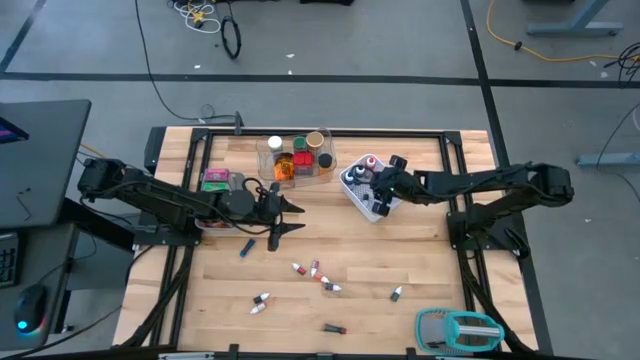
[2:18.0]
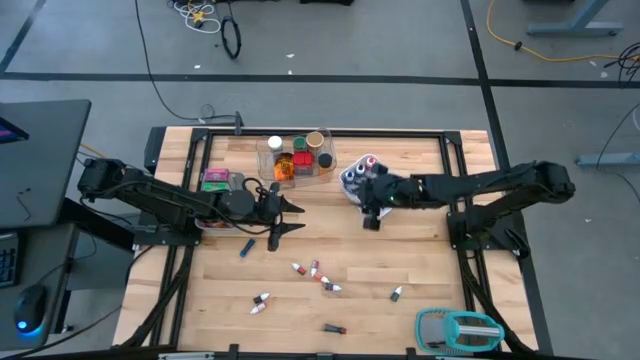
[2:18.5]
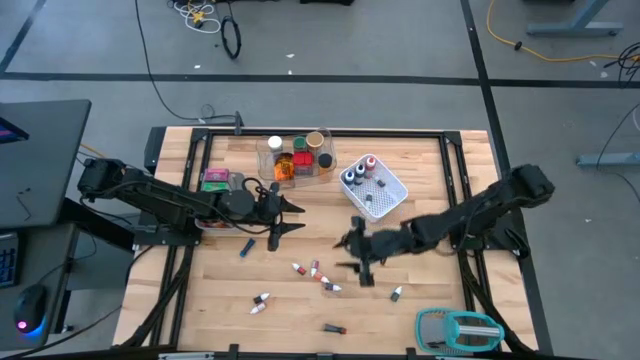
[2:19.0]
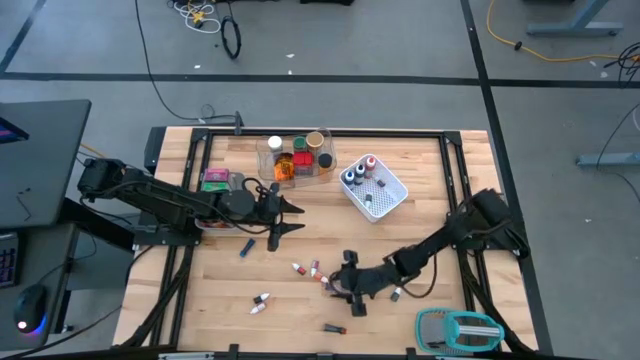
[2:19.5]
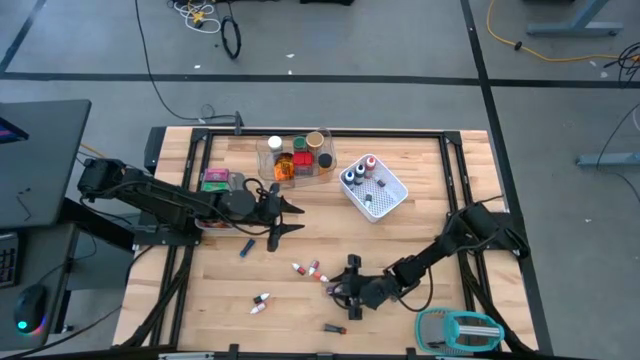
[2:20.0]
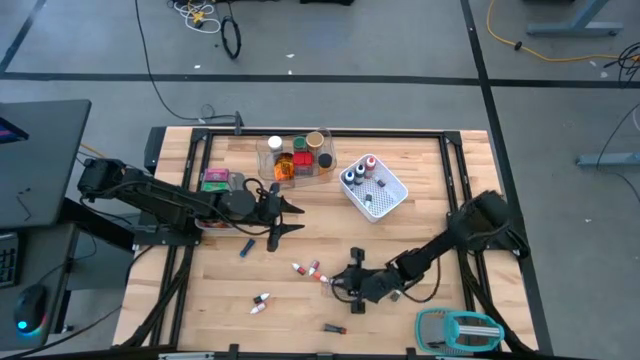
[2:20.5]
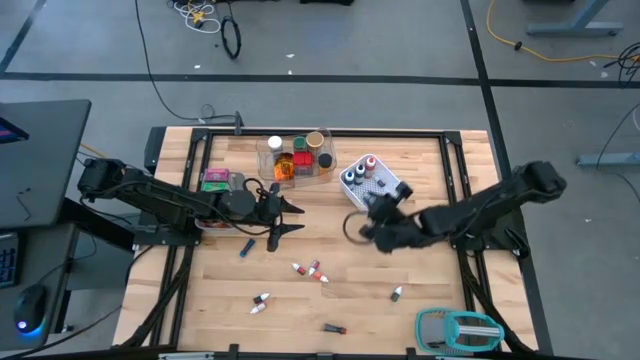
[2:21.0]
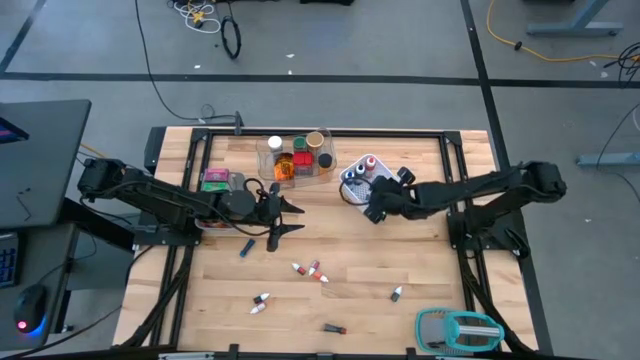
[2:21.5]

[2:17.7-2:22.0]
Task: Pick & Place Kitchen Items
Put the purple food coloring bottle into the white bin

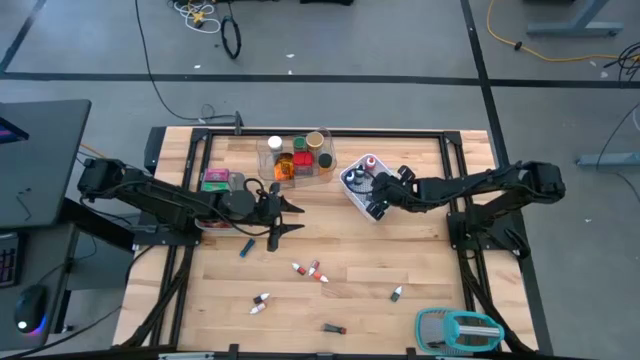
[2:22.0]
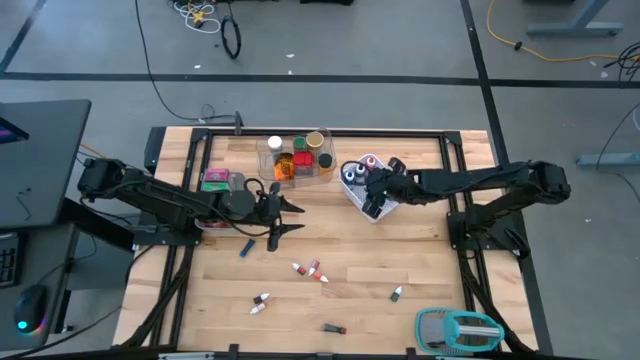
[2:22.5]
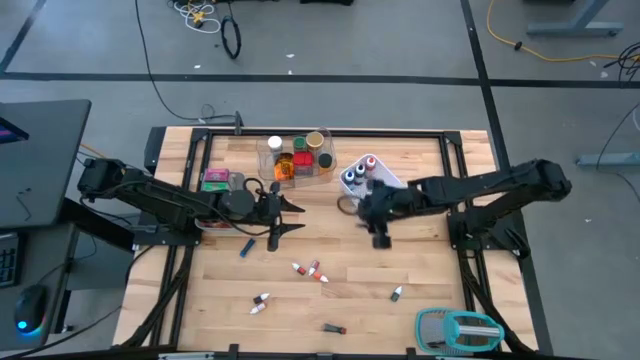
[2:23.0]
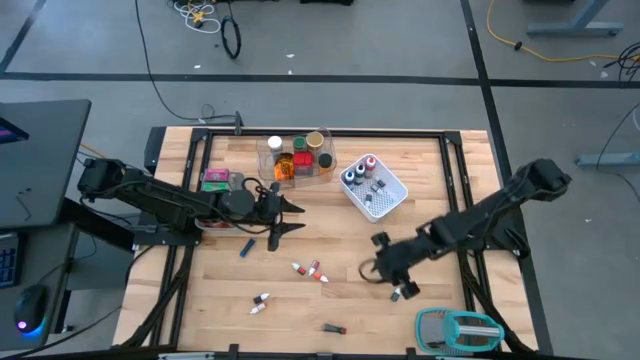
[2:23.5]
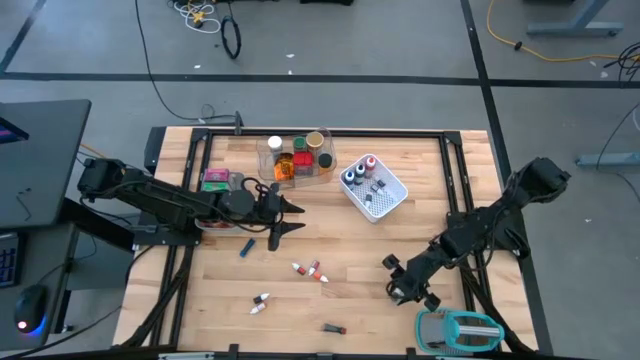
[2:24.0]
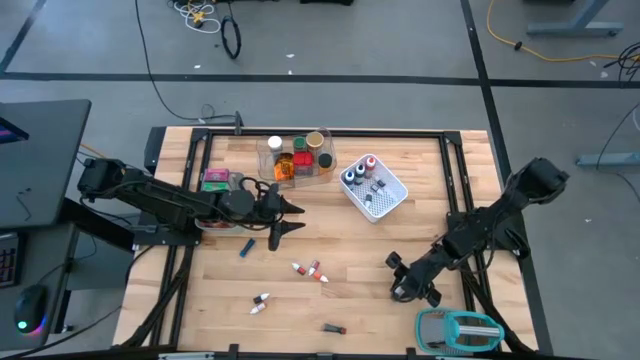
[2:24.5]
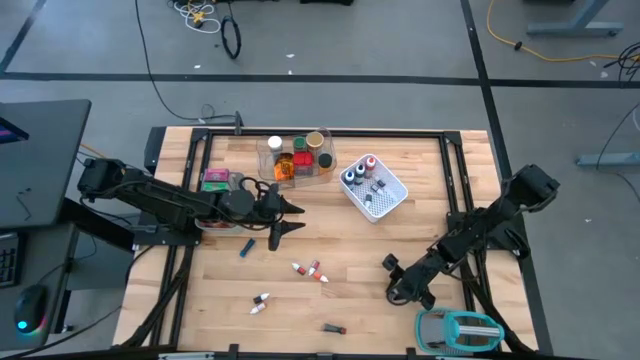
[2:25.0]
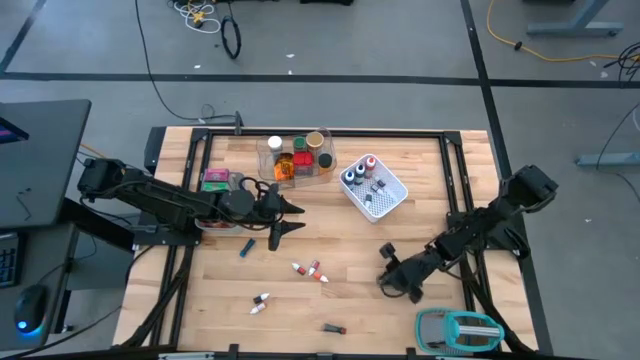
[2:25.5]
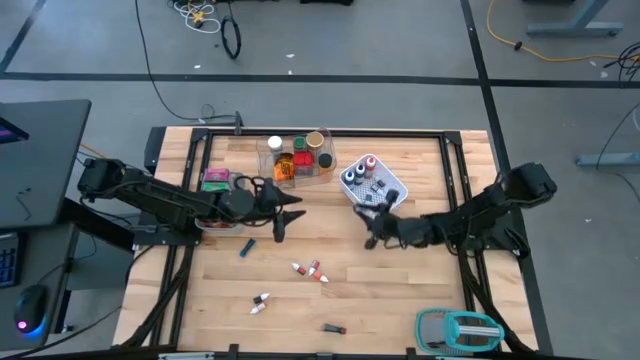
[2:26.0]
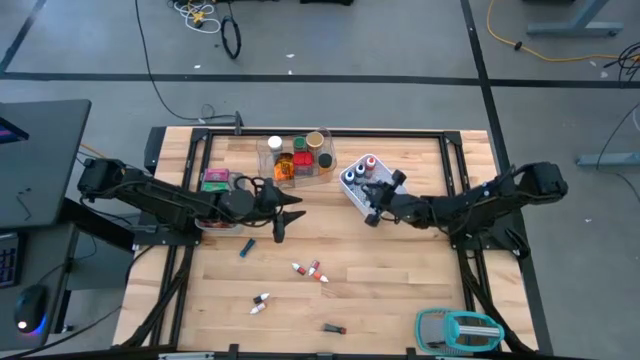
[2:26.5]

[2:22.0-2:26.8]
Put the right black food coloring bottle into the white bin

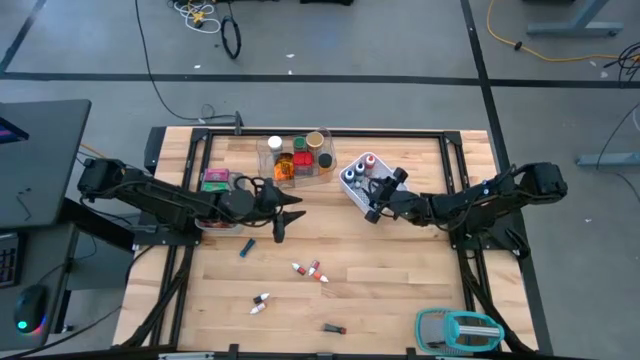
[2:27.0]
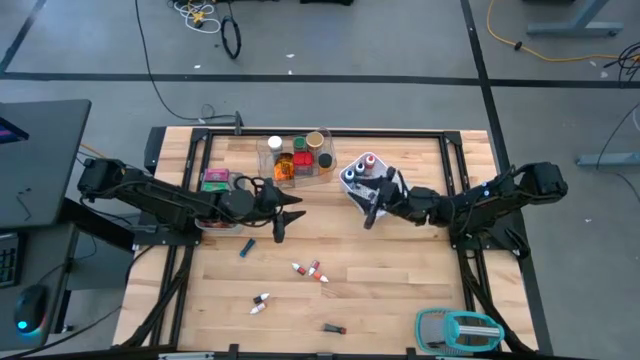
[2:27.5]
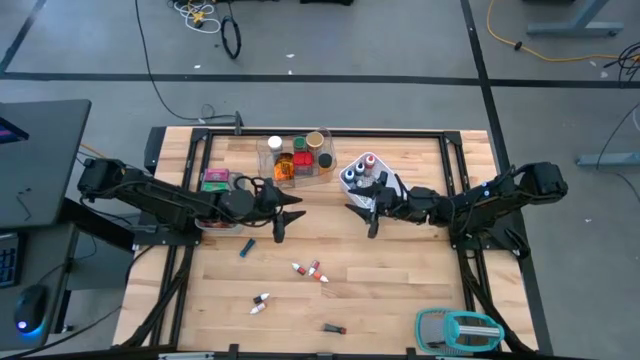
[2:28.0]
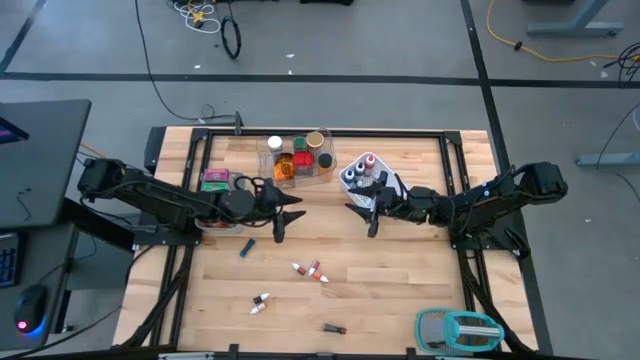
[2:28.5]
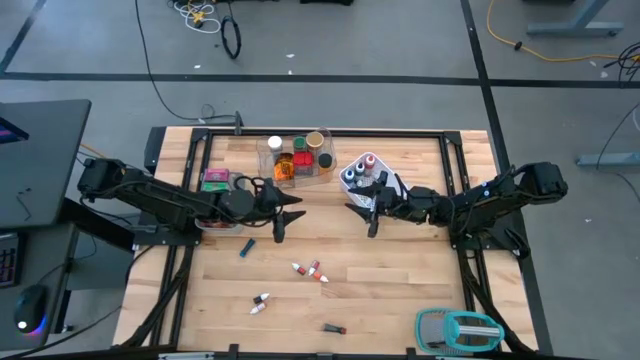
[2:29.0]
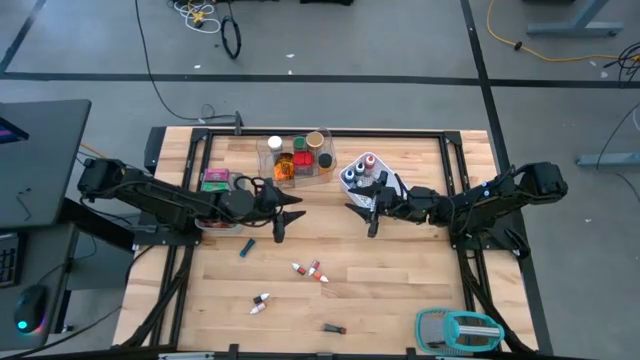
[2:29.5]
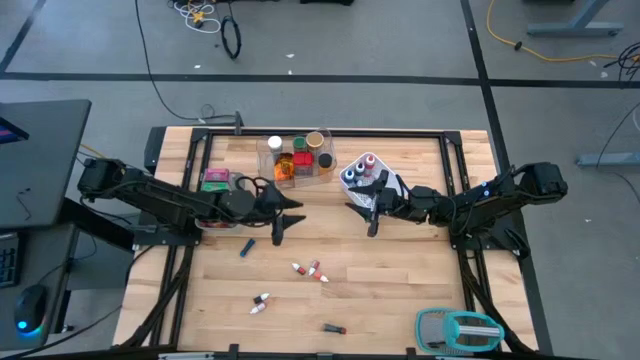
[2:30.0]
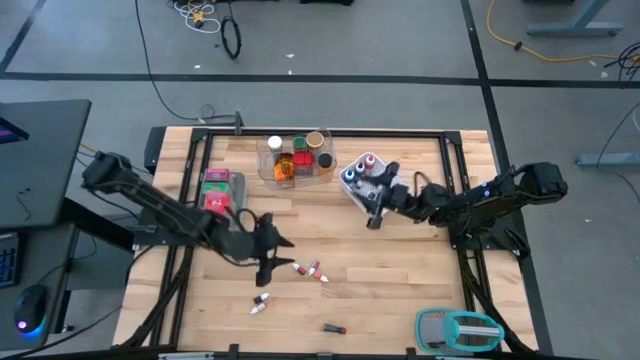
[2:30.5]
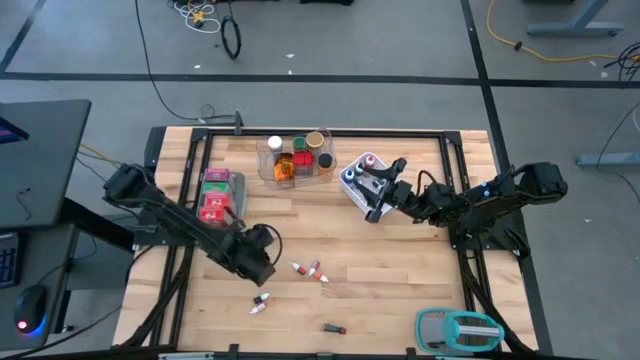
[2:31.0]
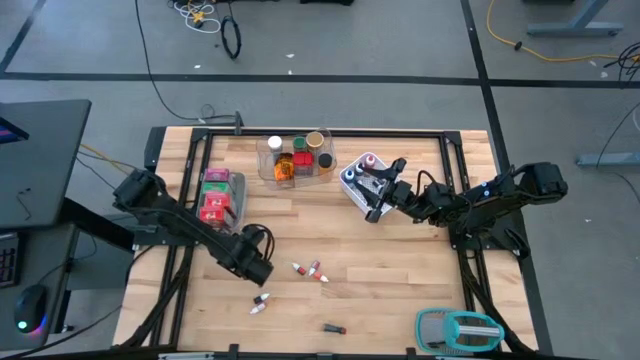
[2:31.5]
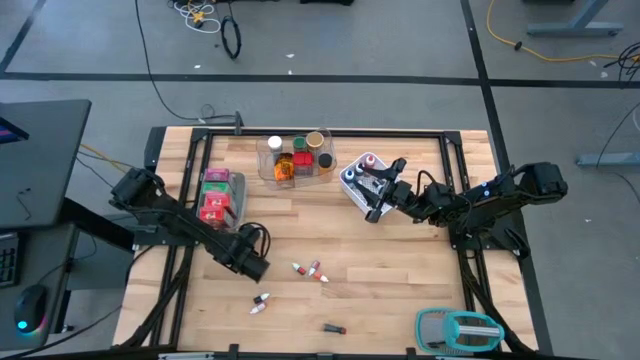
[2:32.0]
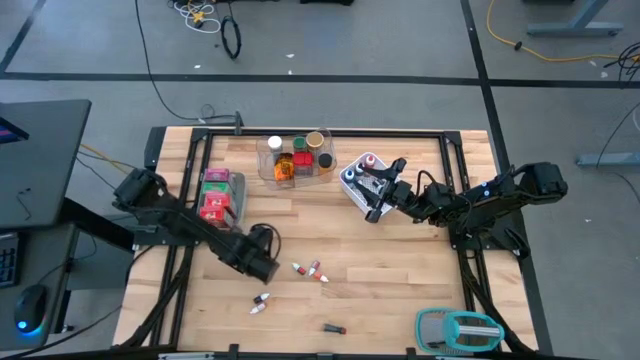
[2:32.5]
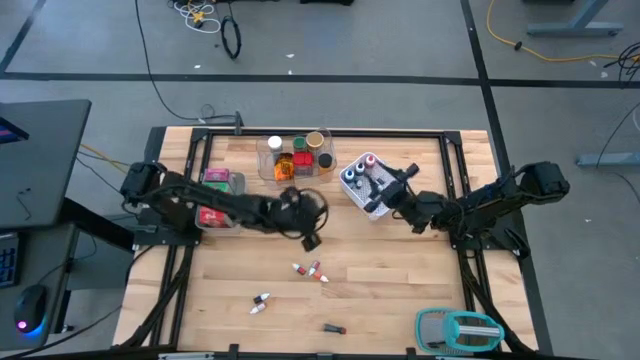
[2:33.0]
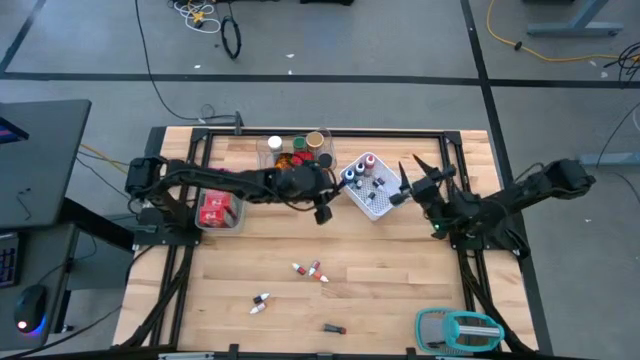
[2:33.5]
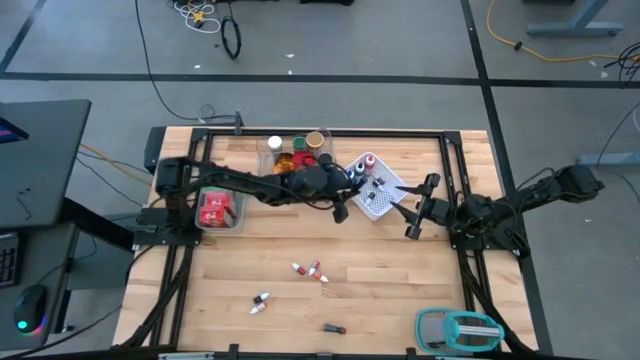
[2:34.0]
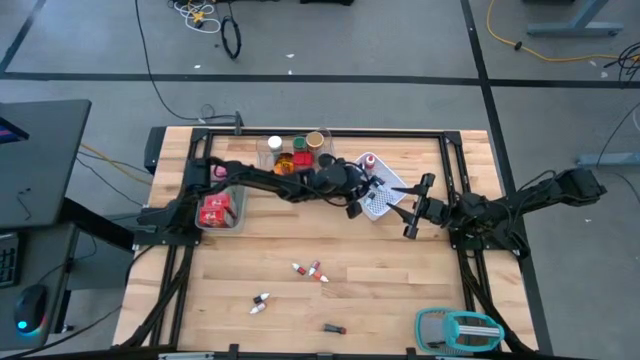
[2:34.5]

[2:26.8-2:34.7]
Put the blue food coloring bottle into the white bin

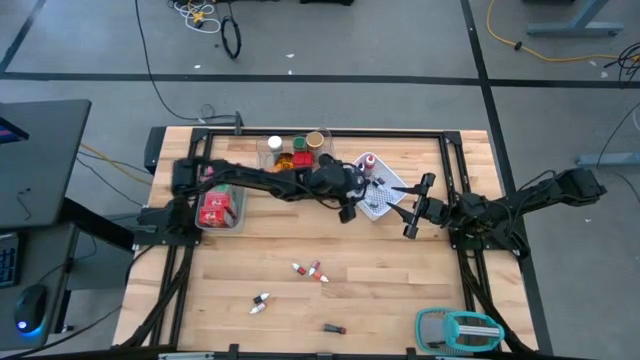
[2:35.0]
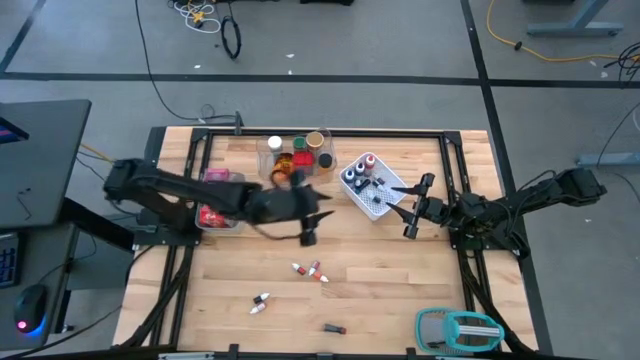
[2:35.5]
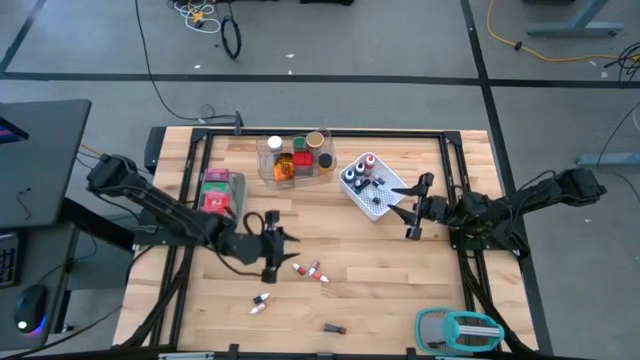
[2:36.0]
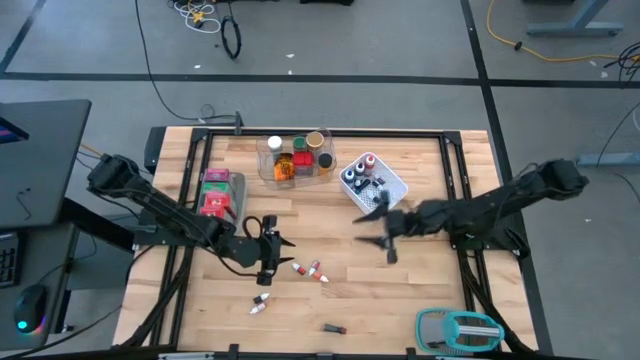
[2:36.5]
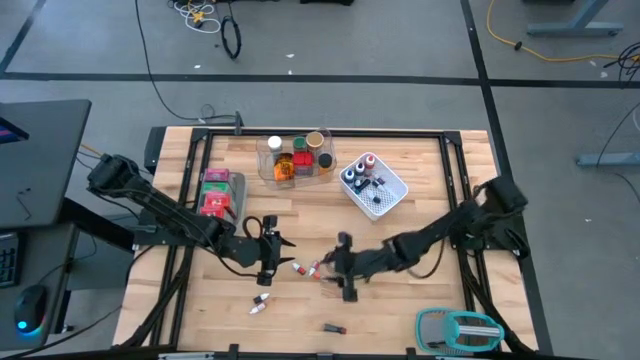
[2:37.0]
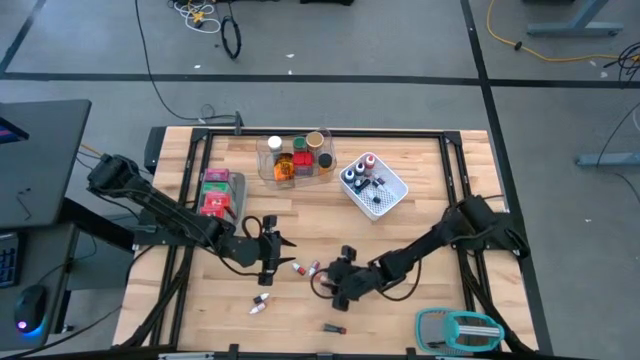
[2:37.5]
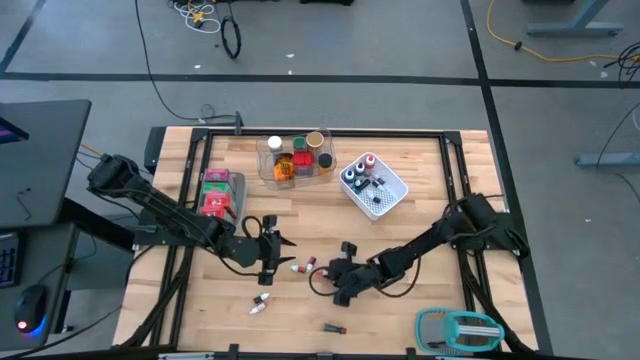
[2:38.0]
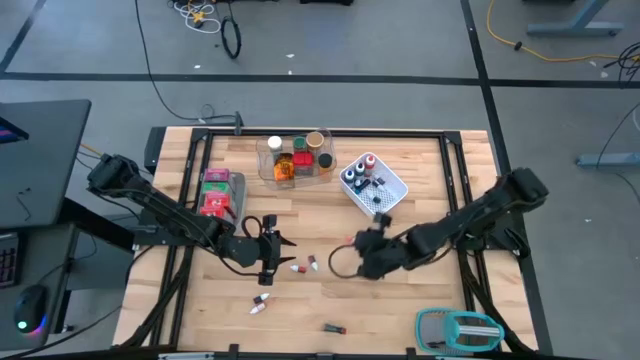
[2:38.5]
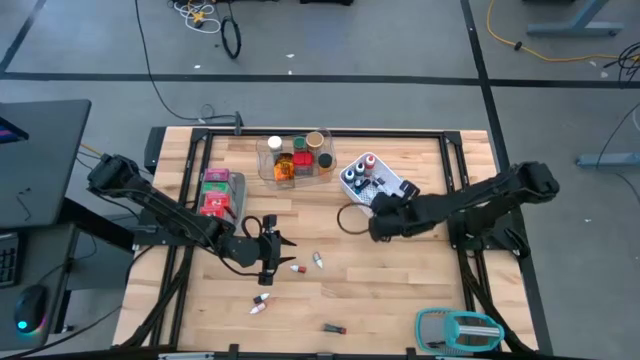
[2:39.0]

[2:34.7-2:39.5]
Put the orange food coloring bottle into the white bin
